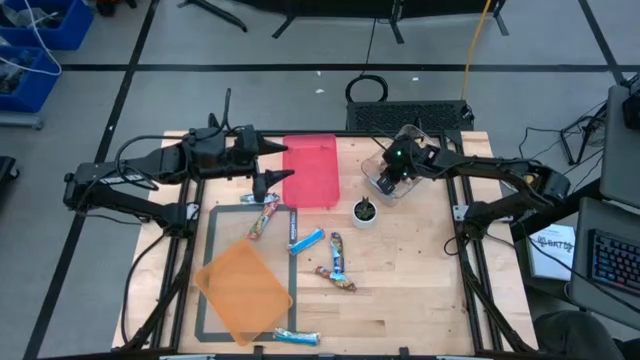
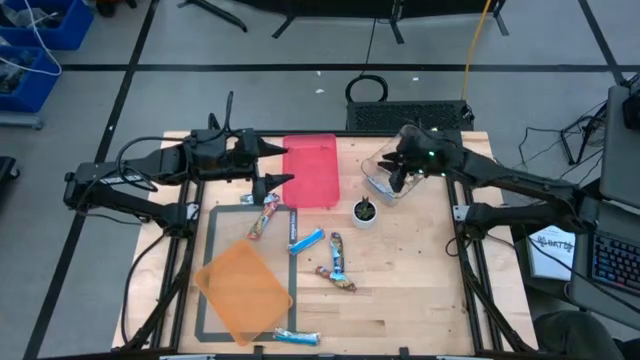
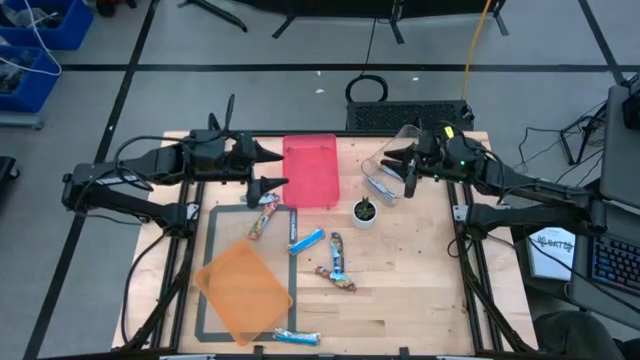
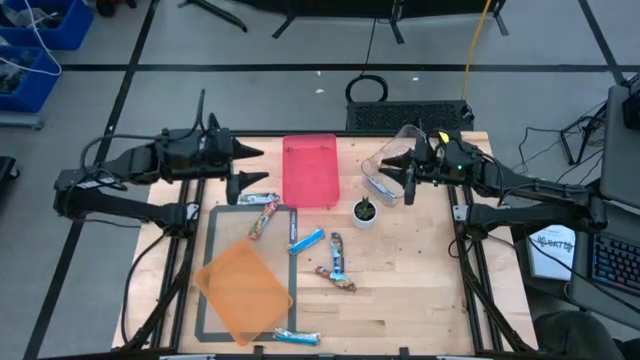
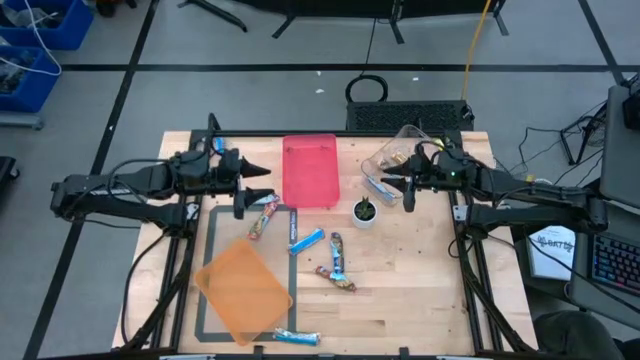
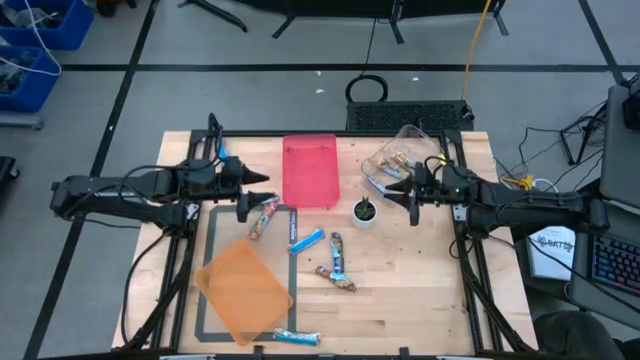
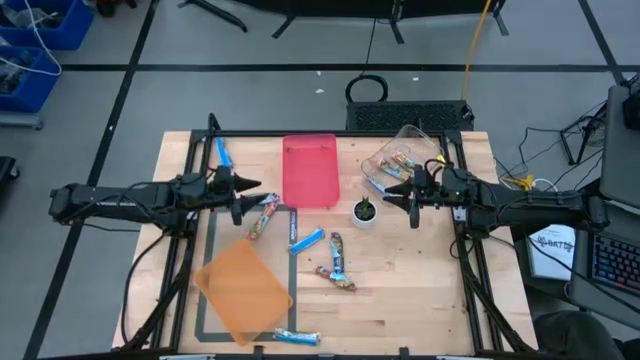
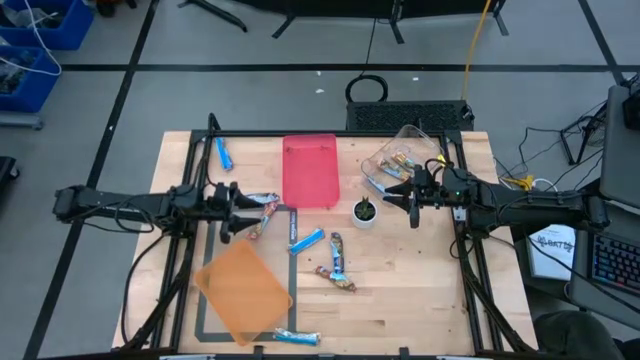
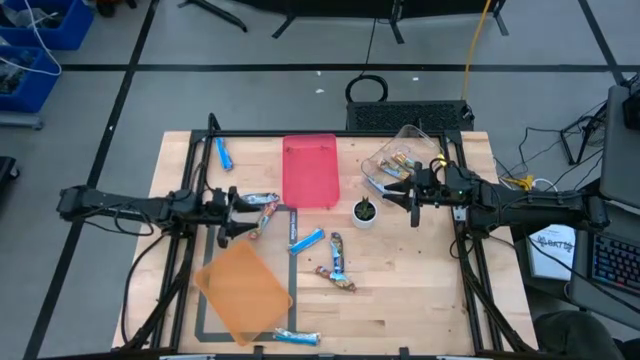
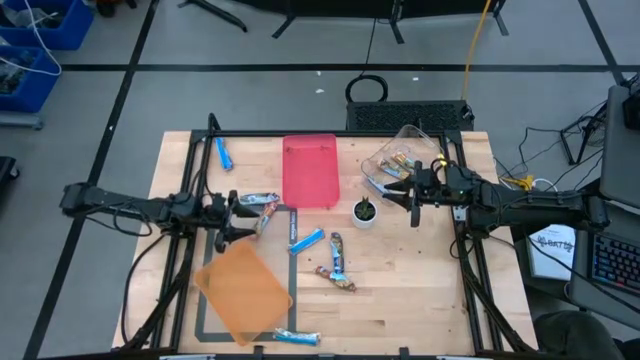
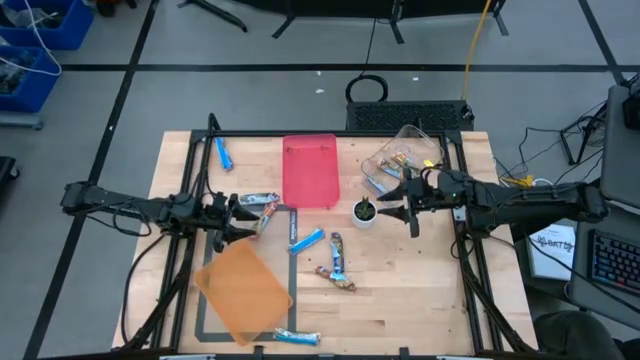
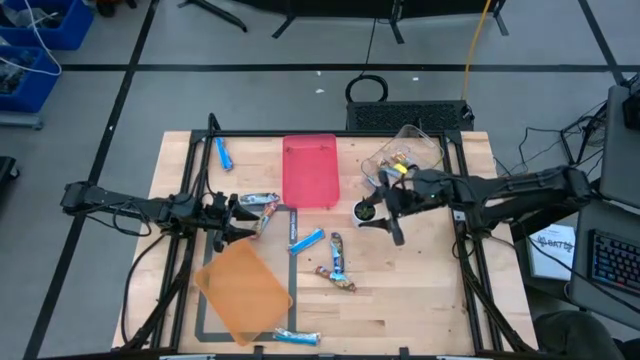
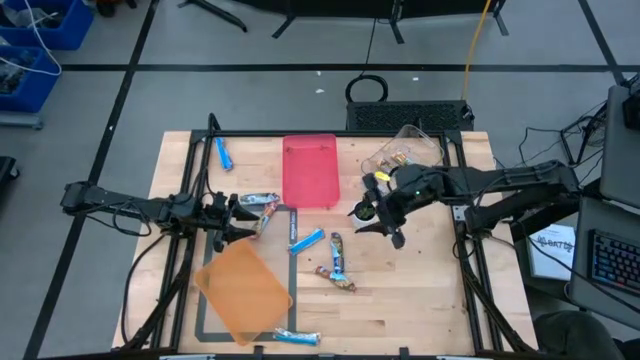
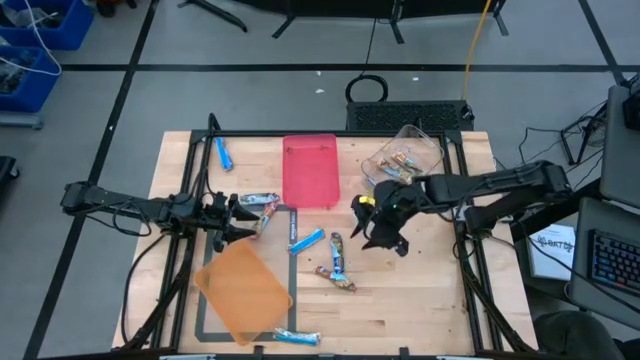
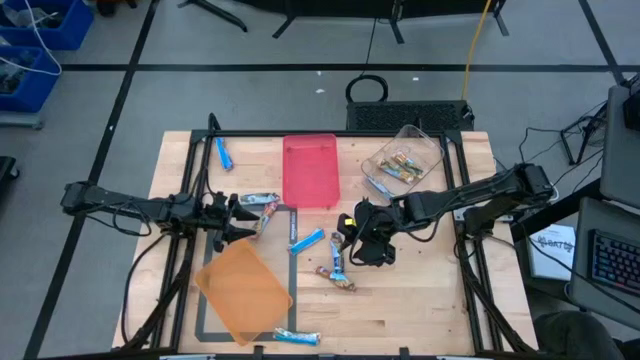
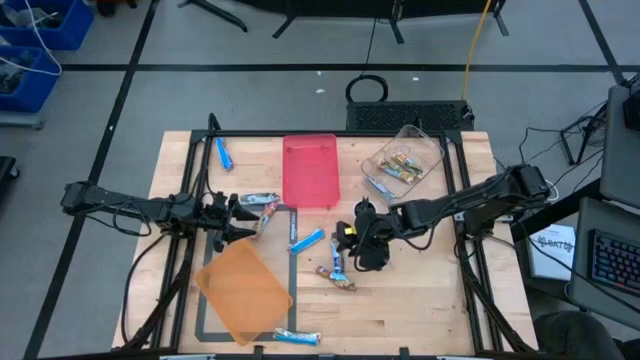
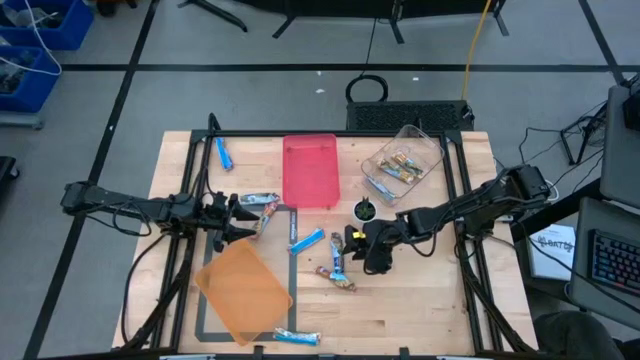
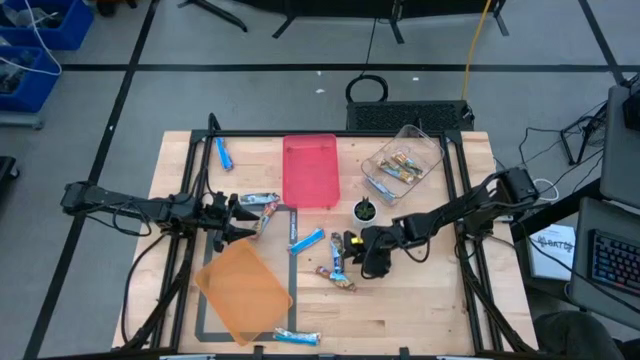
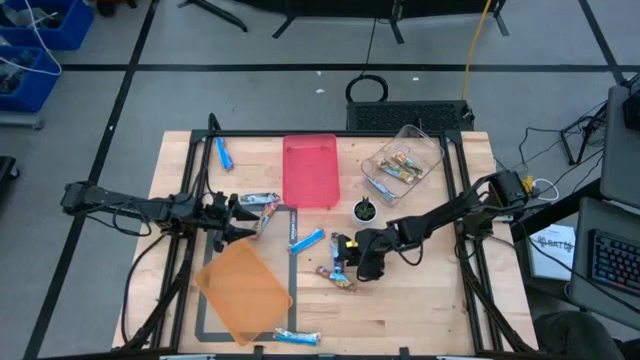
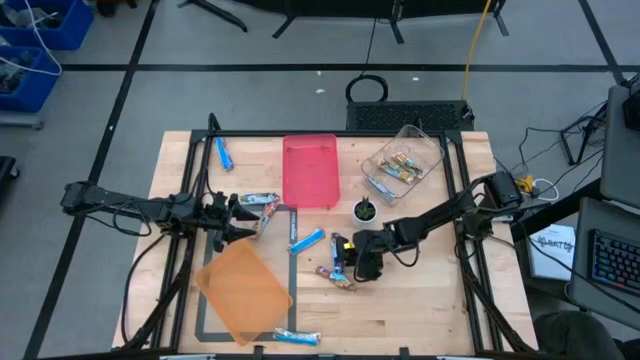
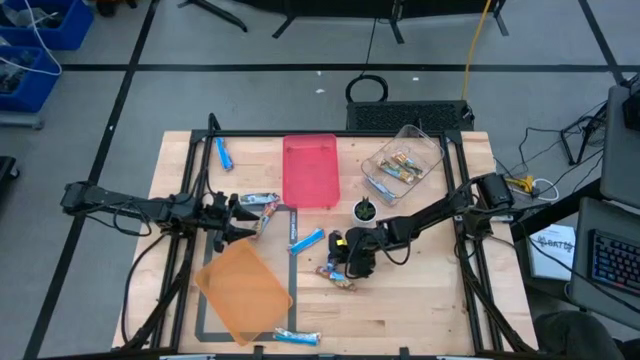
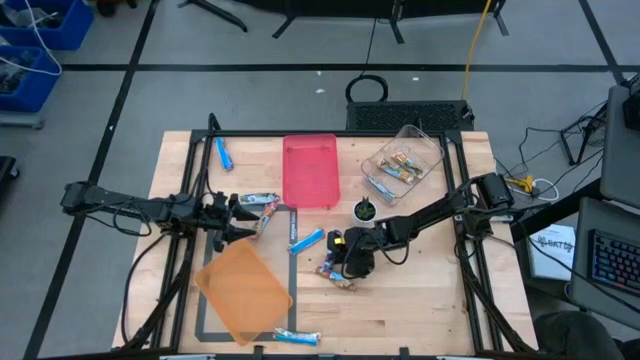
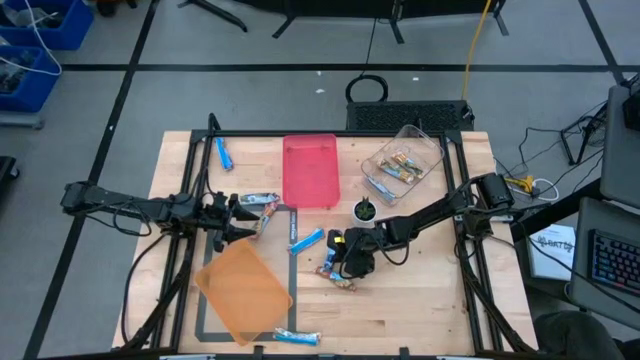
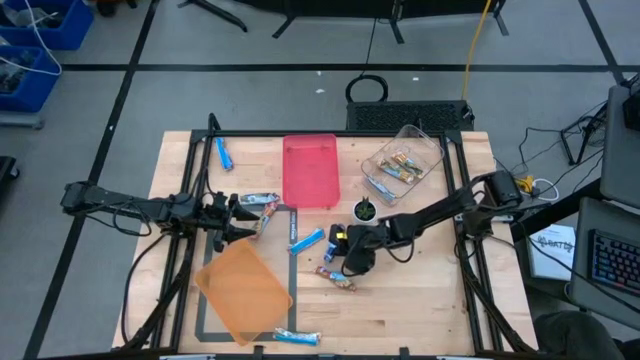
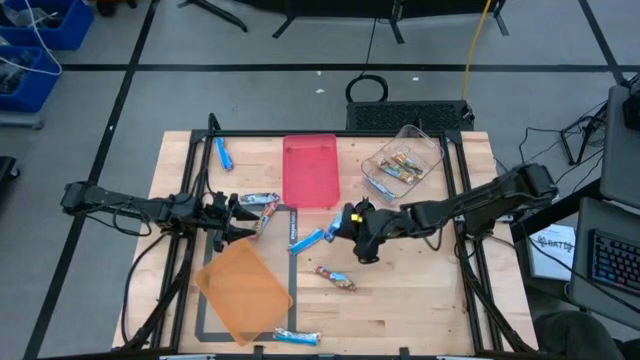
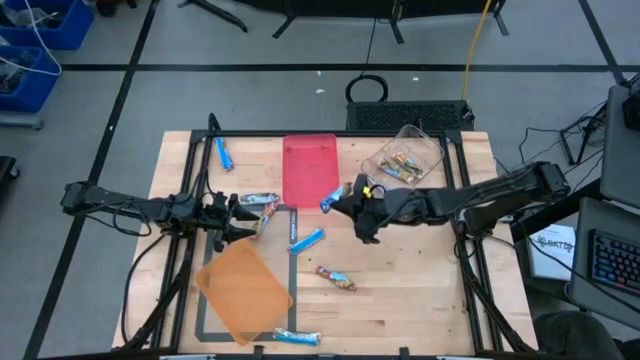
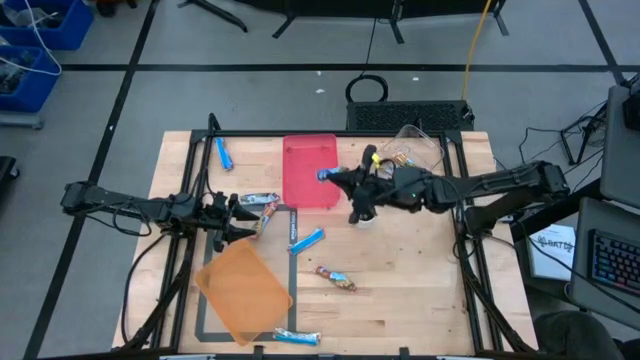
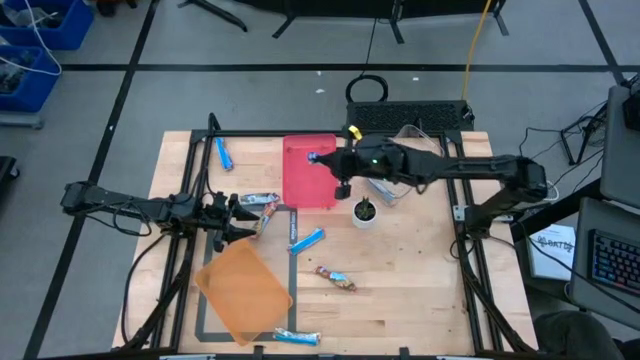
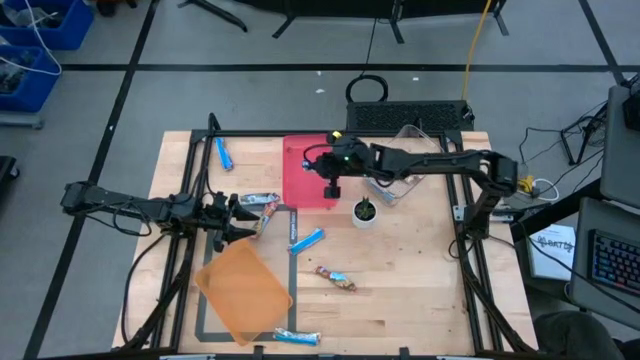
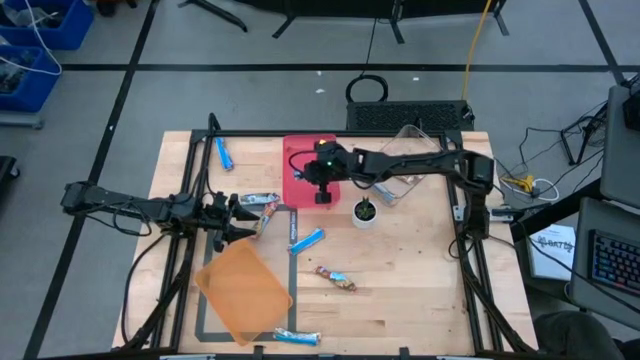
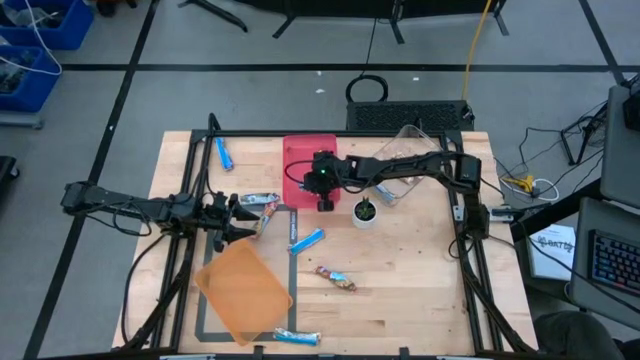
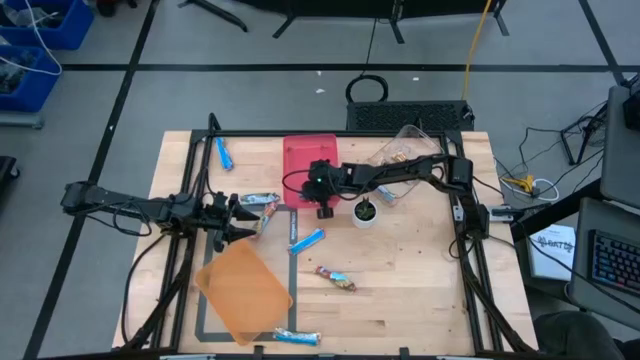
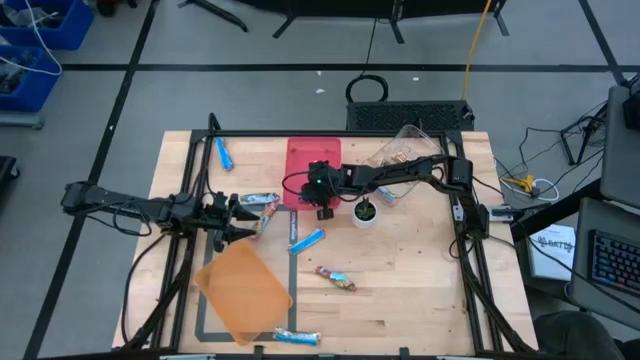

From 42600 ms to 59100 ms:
Task: Pick and place Granola Bars by type
Put the blue granola bar into the red bin
